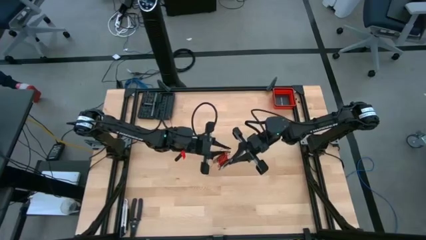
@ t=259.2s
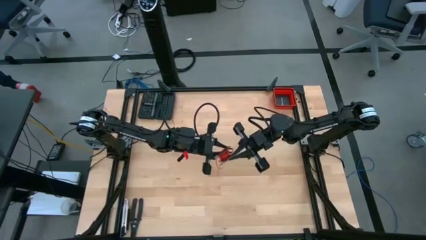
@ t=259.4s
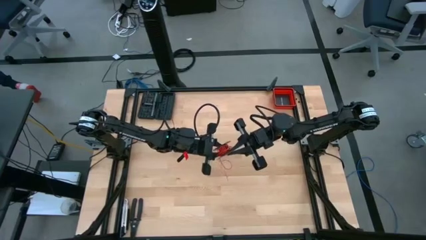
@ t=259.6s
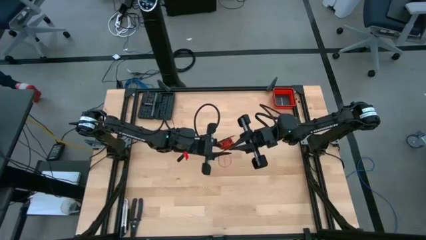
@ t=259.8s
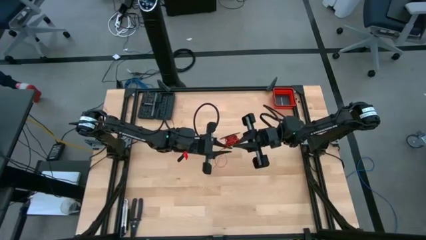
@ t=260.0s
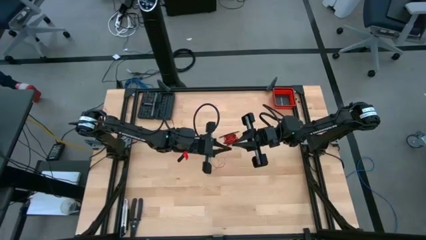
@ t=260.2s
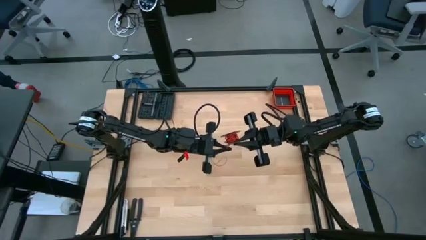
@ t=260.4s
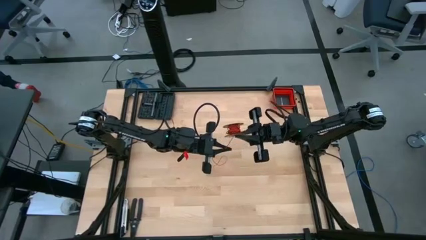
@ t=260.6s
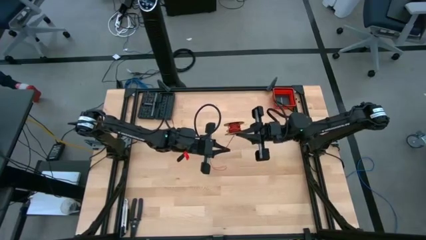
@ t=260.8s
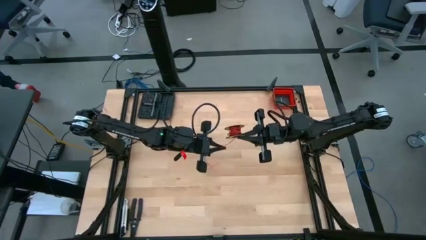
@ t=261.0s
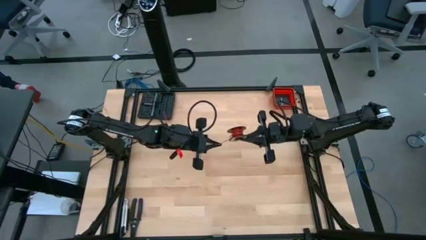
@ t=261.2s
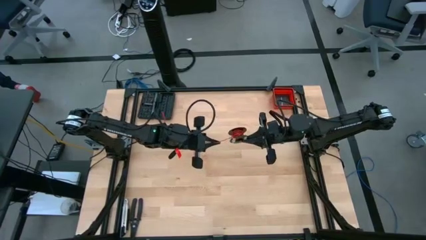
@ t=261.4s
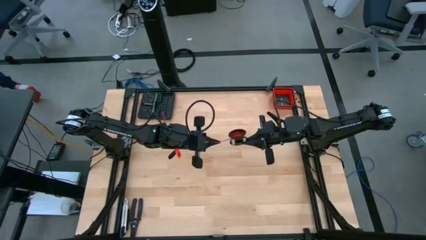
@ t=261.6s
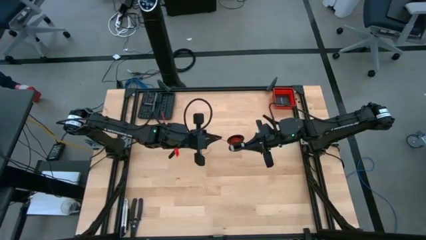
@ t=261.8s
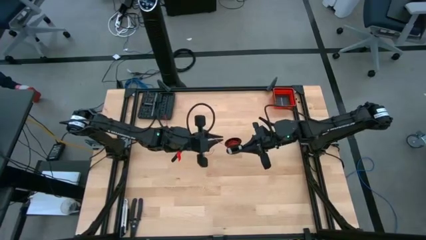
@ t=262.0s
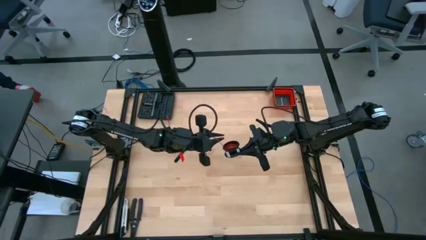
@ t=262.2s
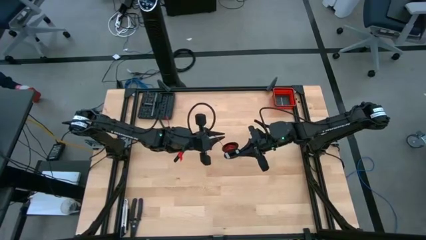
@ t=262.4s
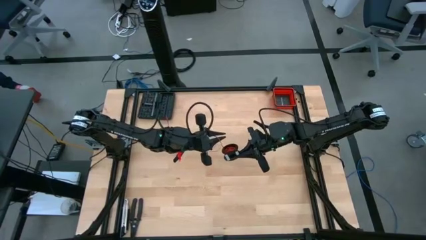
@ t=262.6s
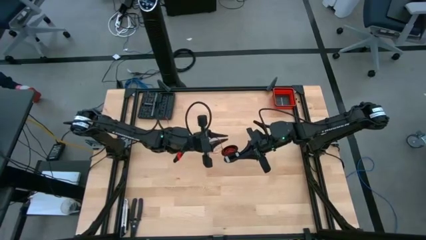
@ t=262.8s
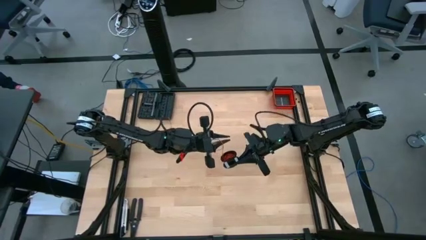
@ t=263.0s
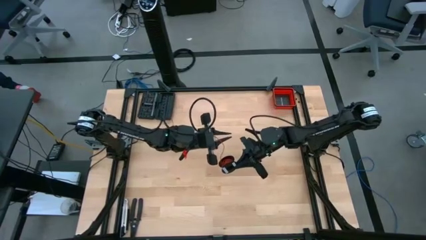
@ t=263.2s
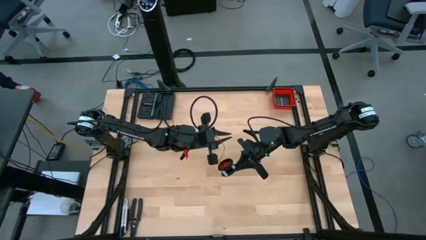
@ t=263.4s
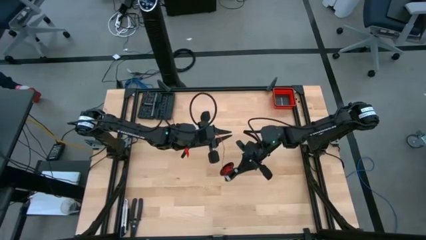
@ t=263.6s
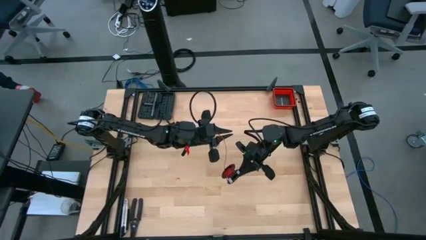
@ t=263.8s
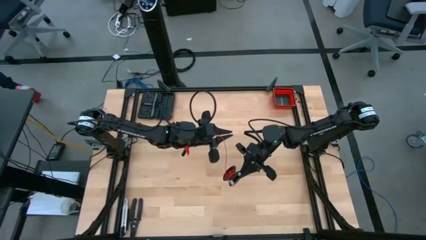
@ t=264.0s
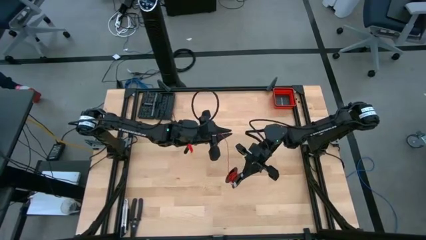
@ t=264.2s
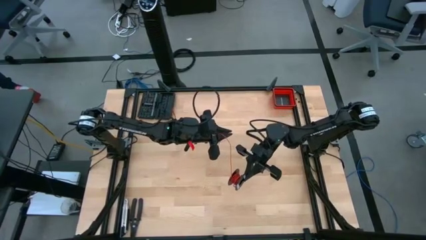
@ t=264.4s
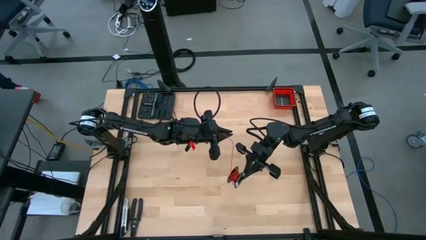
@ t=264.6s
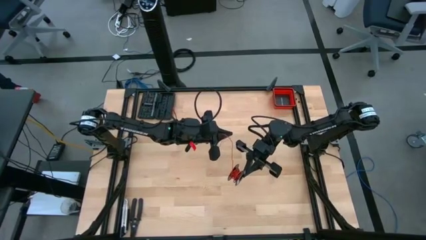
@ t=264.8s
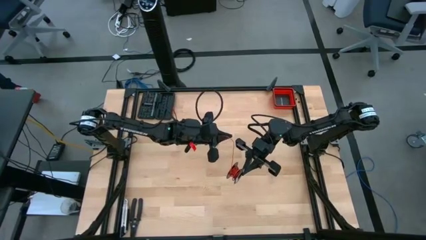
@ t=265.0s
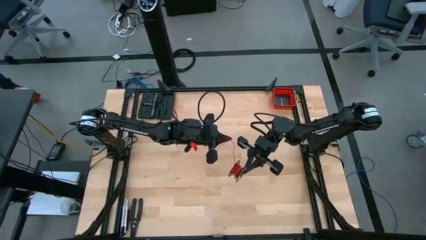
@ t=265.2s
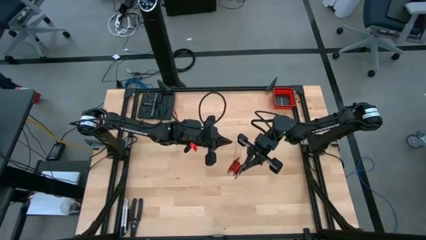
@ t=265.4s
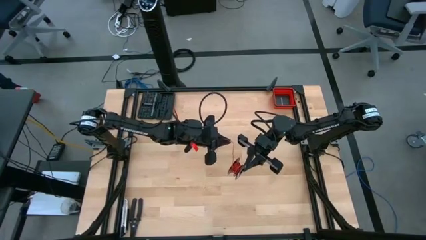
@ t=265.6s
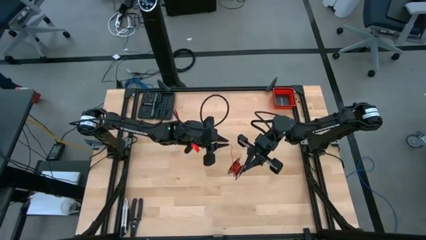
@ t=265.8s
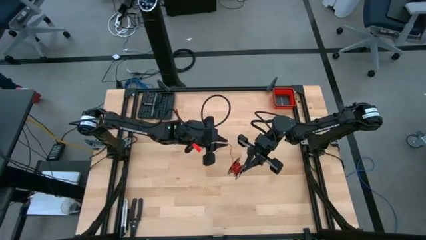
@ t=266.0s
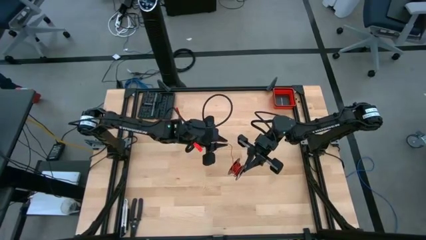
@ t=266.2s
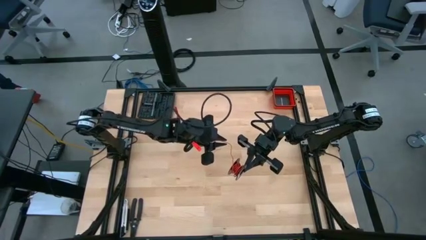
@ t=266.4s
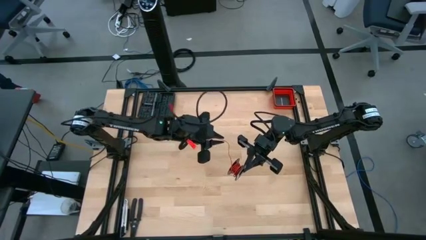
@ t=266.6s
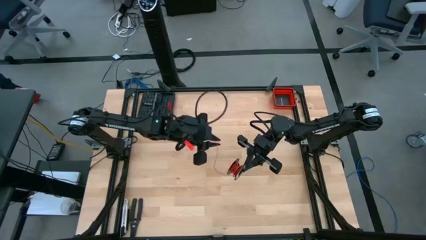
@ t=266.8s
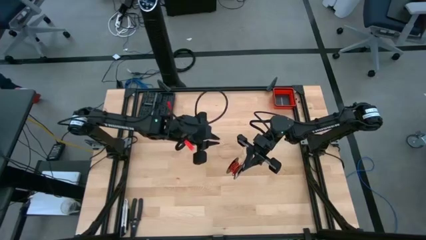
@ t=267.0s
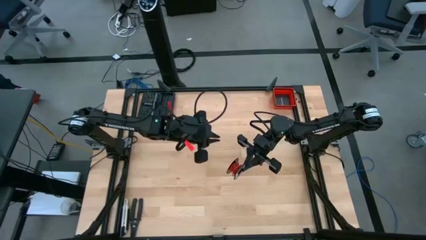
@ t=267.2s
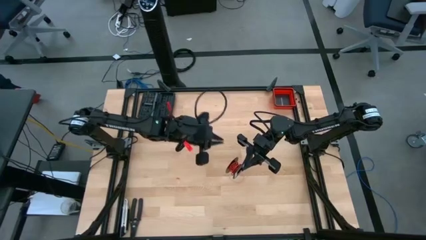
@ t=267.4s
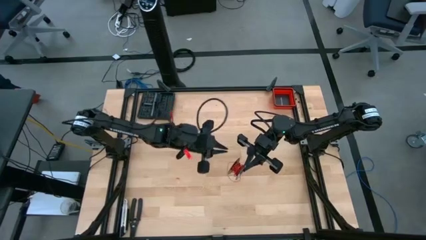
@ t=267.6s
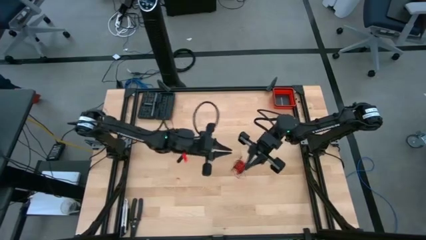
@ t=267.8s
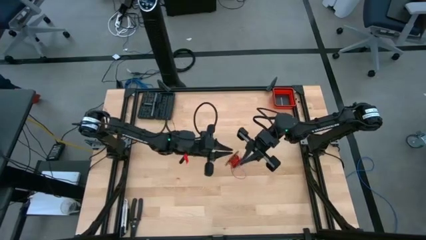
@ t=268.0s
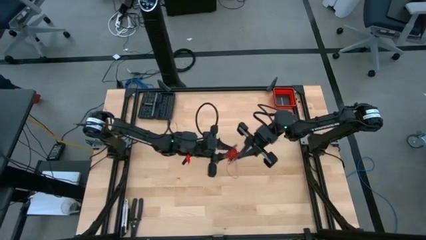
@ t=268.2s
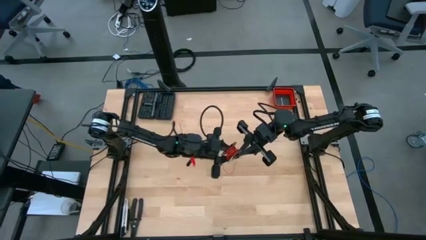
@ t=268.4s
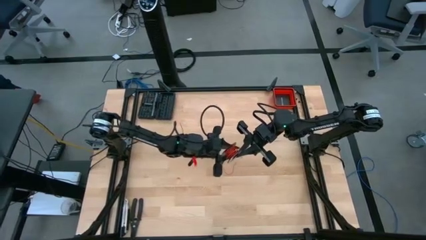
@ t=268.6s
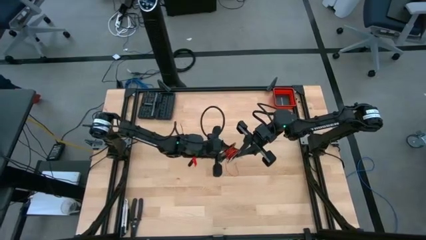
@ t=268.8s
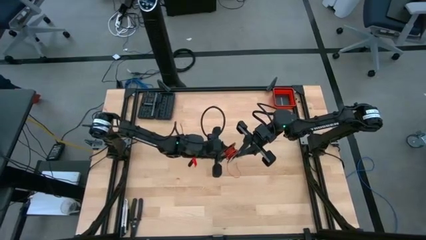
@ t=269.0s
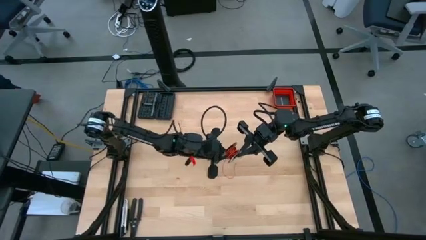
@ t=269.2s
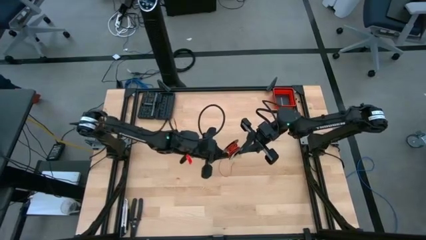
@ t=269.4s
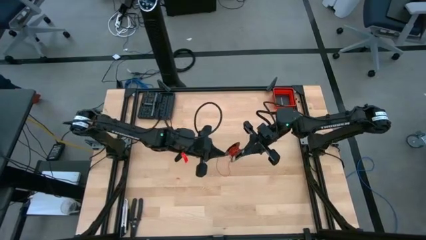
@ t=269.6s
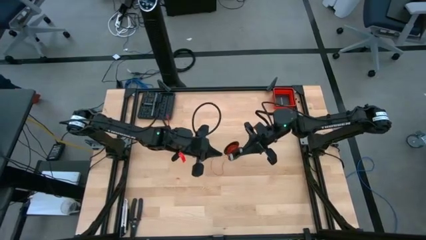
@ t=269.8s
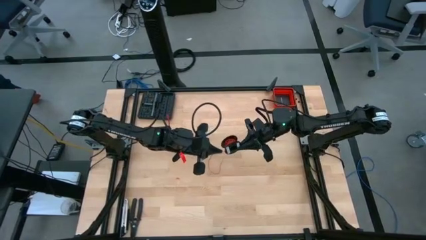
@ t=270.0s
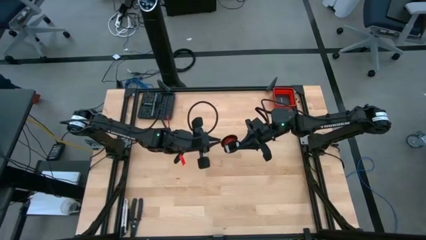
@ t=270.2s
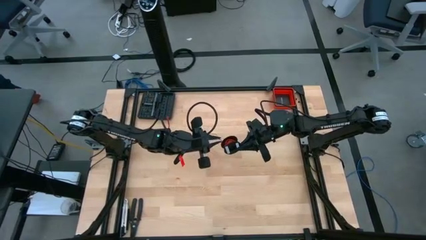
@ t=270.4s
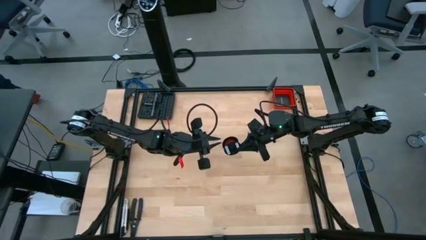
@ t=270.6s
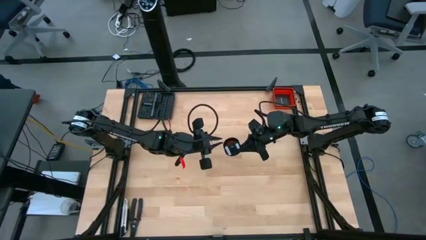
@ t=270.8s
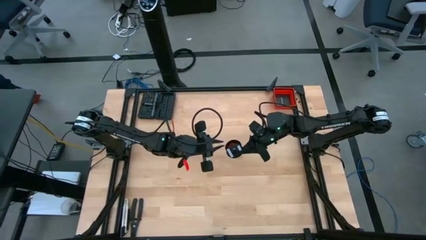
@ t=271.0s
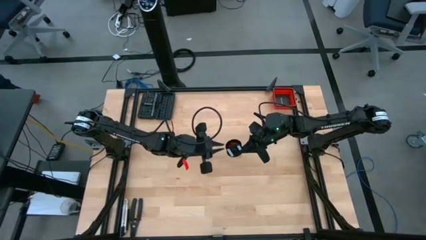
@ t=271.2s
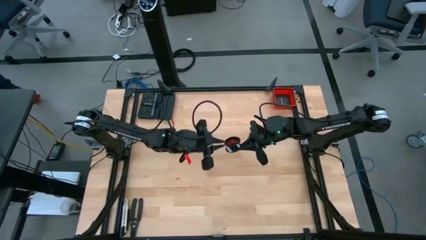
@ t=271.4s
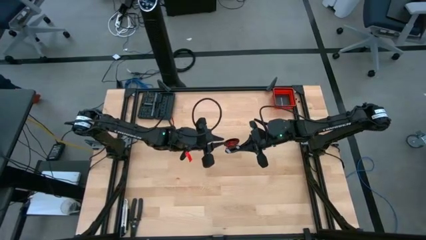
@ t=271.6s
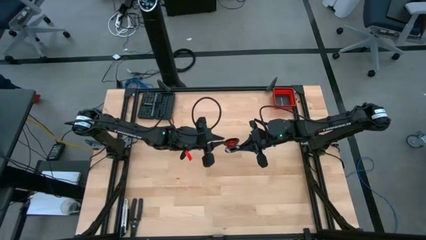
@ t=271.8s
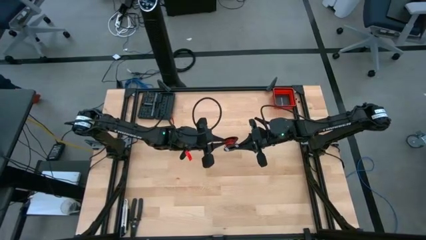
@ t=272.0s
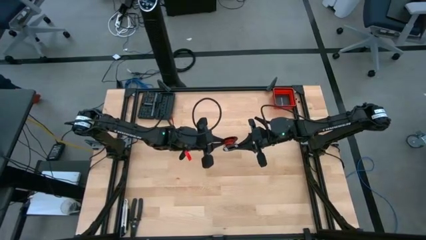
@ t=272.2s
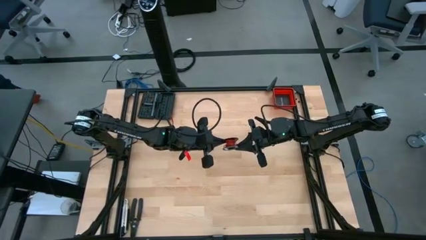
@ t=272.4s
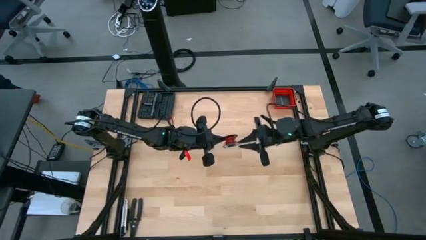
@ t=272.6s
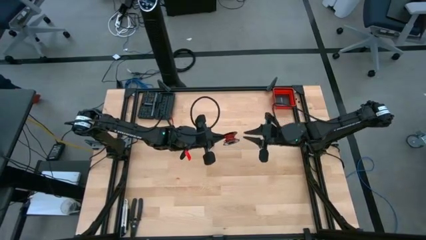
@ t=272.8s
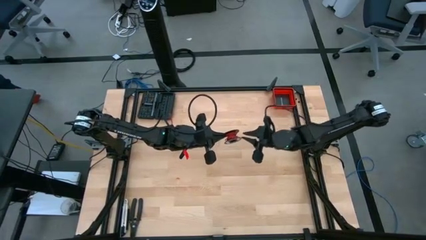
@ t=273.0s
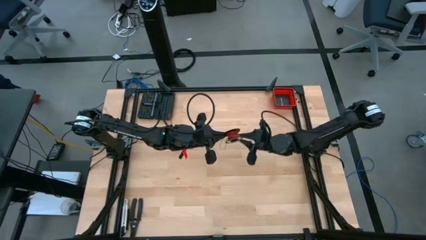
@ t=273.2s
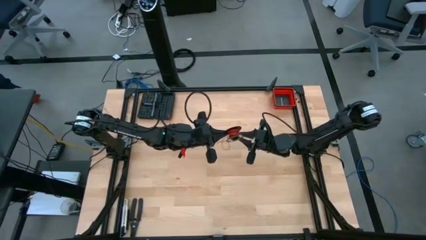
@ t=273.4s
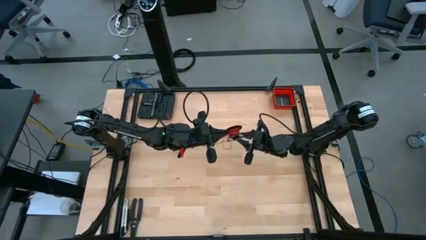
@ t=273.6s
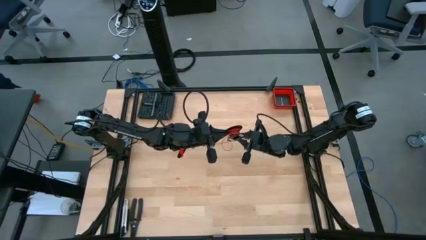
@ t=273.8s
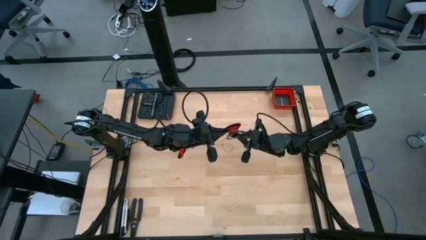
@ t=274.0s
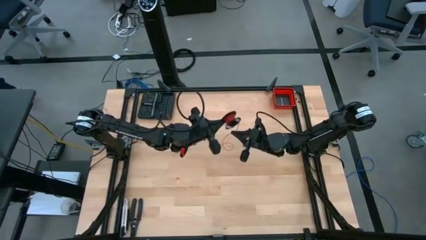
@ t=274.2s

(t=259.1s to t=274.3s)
Task: Coil cords
Coil the red wire on the black spool
